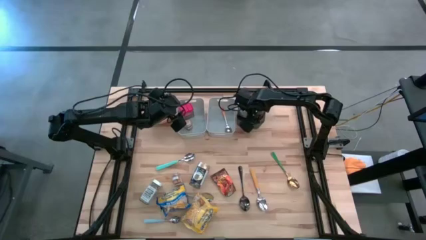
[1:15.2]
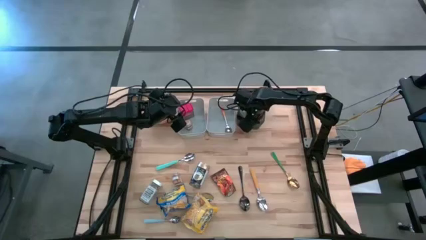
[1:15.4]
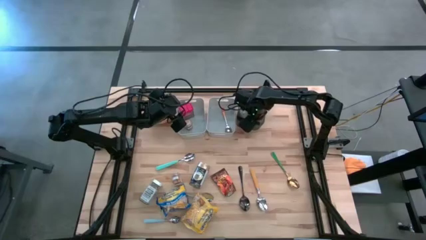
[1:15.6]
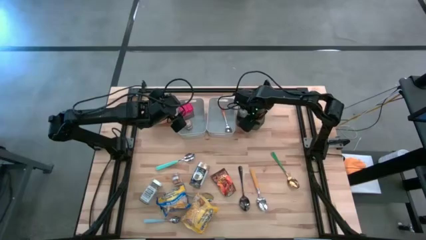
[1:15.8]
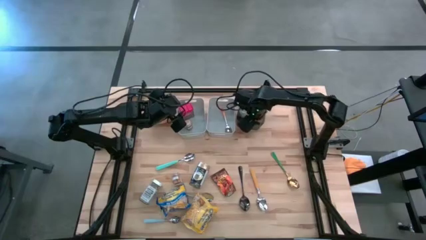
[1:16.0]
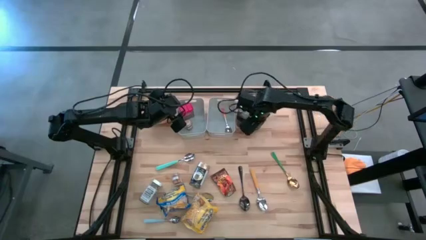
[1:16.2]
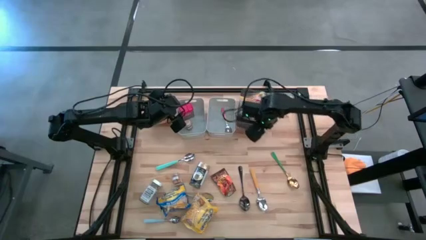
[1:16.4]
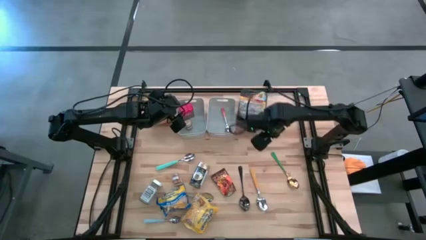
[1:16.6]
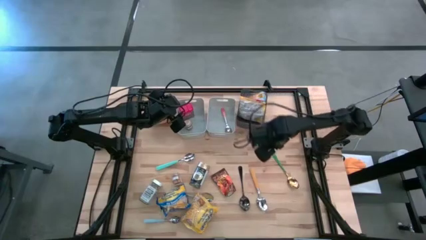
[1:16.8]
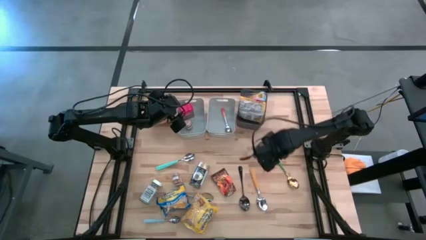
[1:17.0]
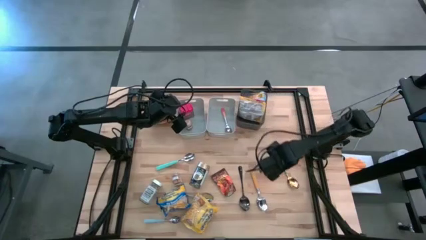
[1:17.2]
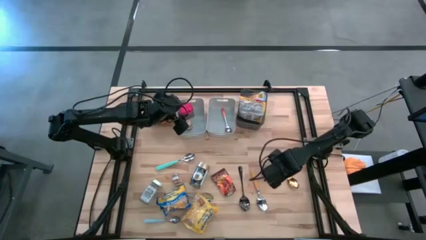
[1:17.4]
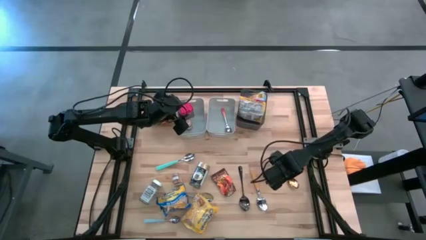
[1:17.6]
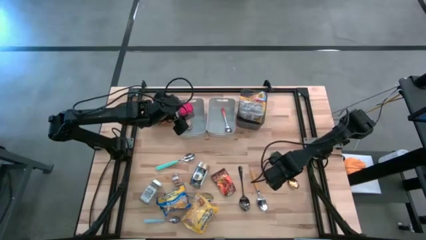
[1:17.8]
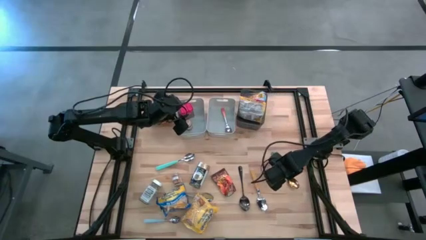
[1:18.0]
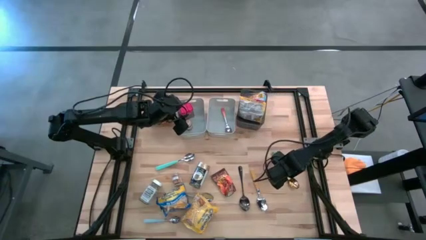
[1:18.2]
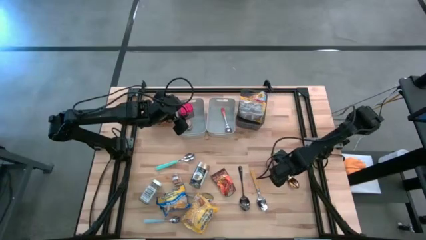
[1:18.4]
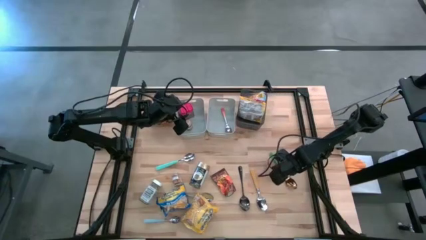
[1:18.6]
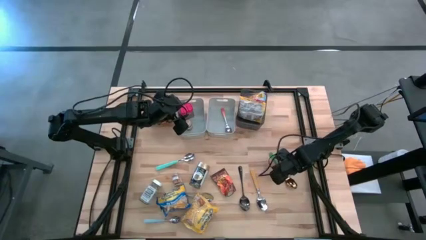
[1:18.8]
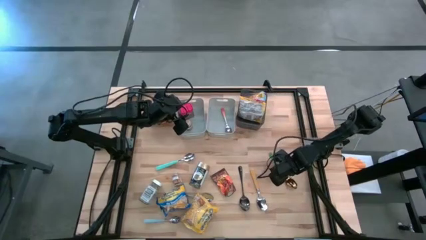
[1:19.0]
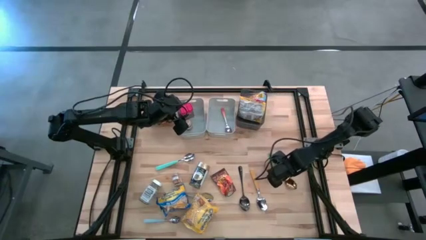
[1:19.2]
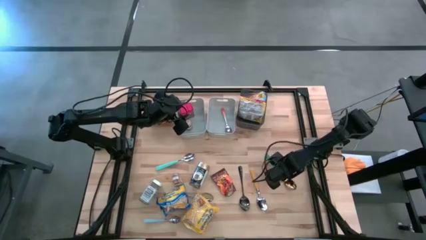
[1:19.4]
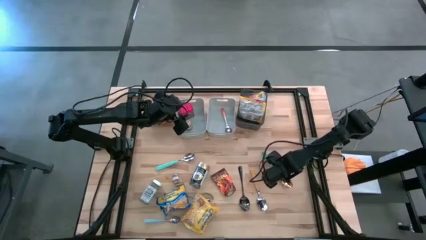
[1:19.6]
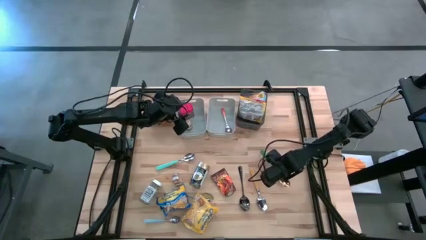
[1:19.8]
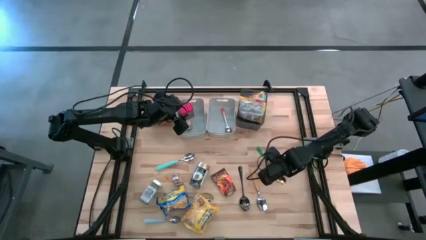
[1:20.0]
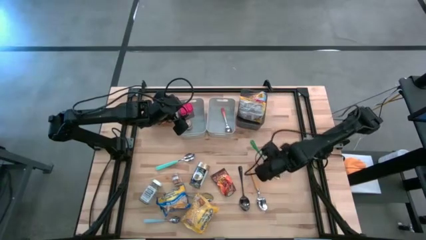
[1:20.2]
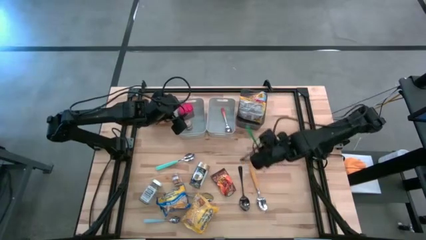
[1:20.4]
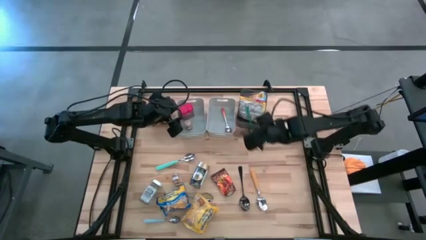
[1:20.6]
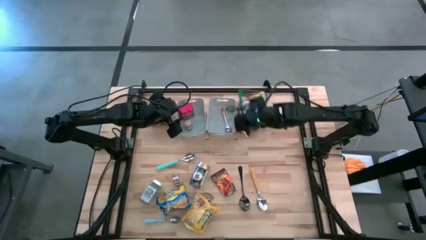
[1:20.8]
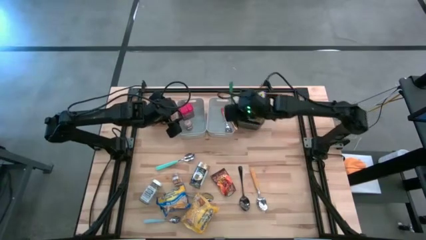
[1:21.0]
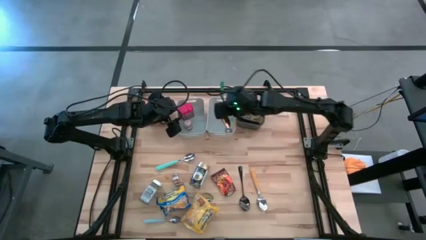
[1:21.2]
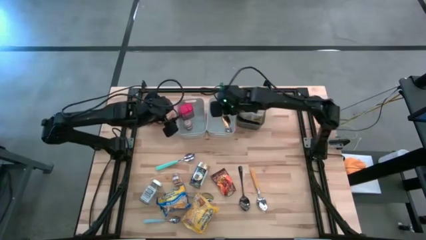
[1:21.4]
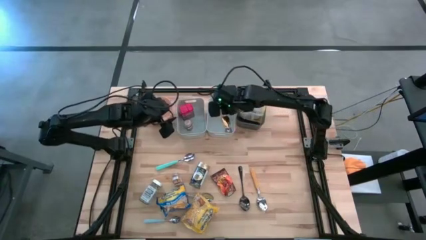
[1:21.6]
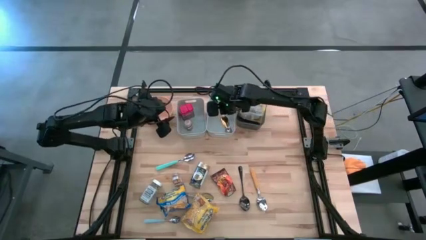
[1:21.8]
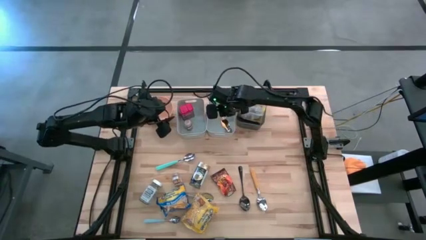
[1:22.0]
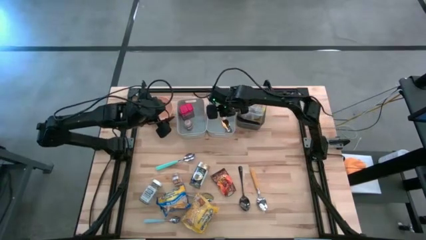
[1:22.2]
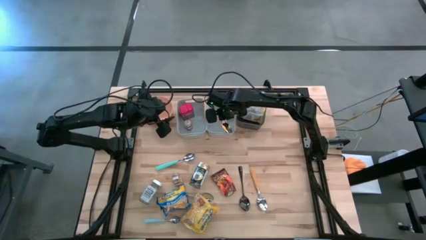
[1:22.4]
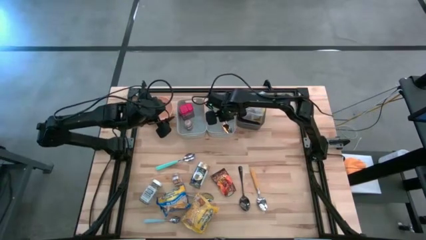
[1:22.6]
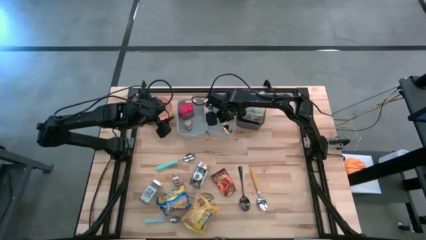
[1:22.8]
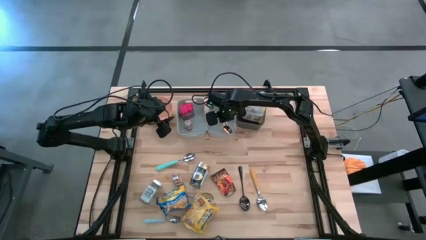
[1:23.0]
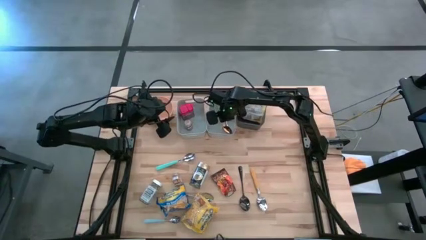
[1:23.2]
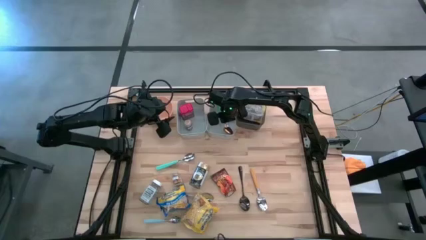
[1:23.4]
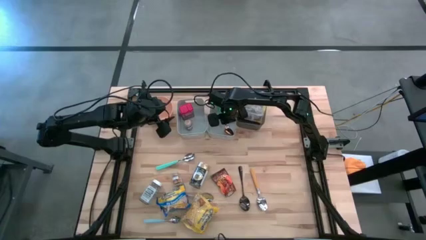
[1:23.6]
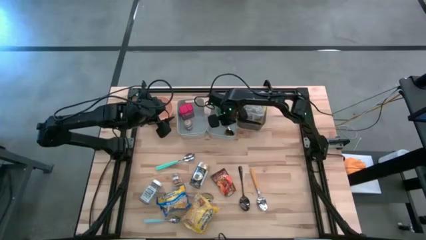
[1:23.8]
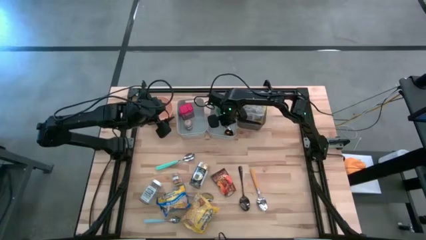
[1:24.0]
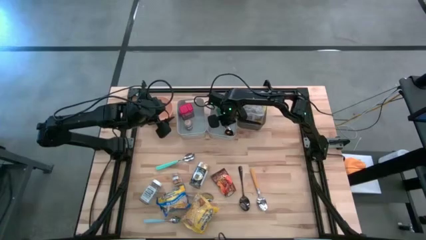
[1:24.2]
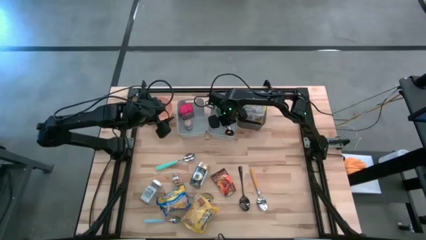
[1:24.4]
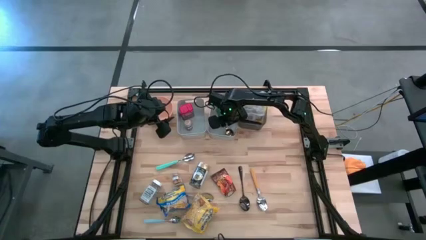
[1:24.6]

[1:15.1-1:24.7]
Put the green spoon into the right gray bin

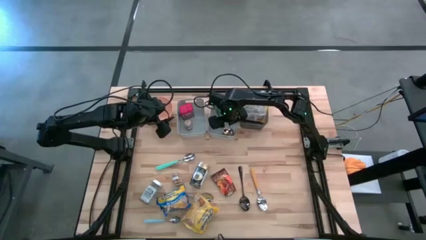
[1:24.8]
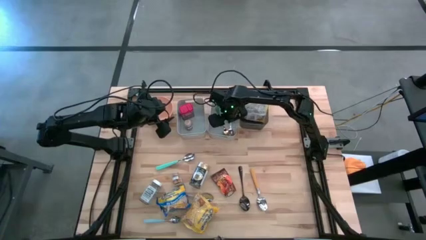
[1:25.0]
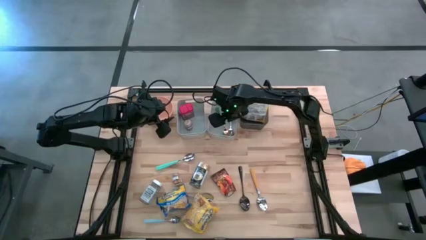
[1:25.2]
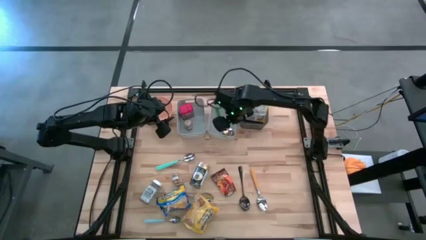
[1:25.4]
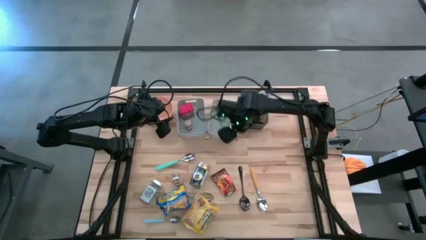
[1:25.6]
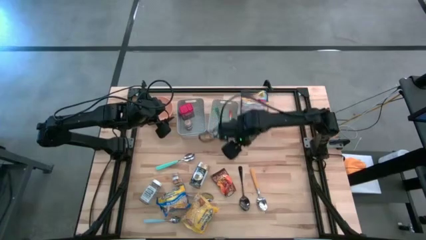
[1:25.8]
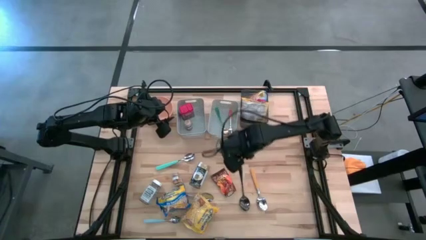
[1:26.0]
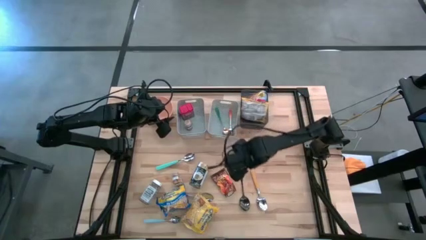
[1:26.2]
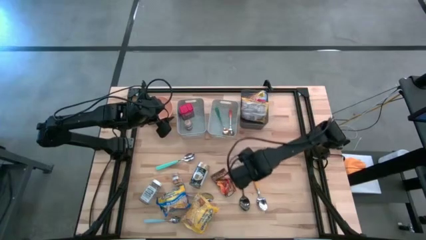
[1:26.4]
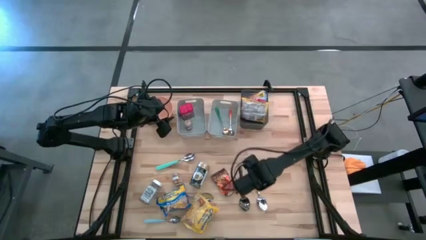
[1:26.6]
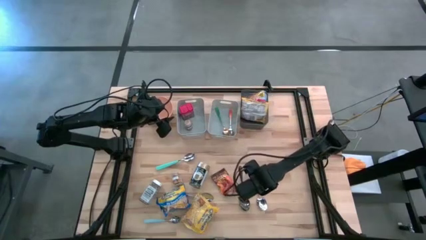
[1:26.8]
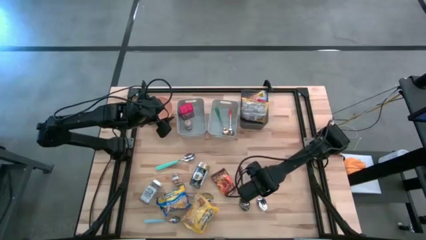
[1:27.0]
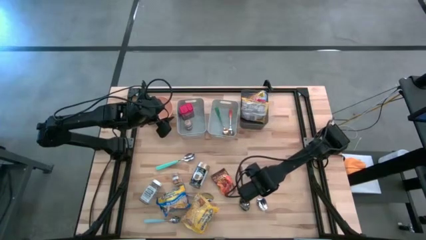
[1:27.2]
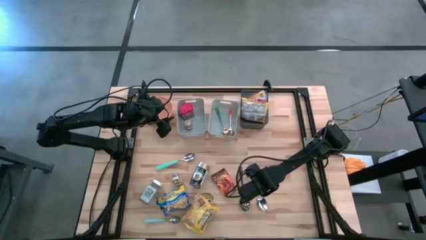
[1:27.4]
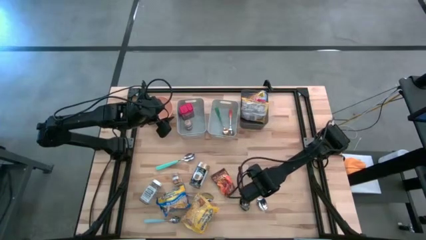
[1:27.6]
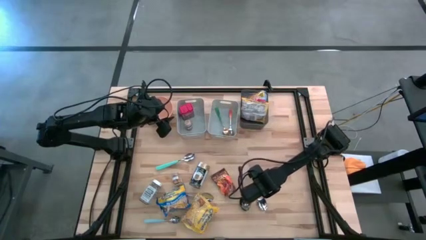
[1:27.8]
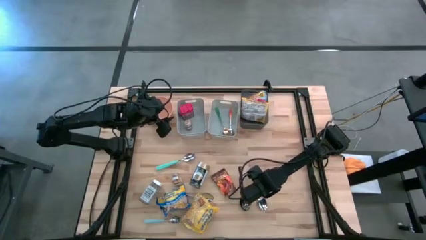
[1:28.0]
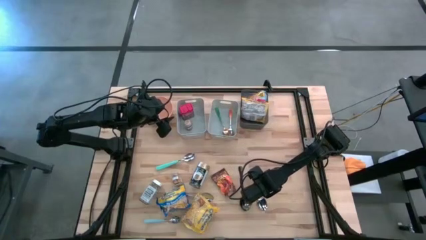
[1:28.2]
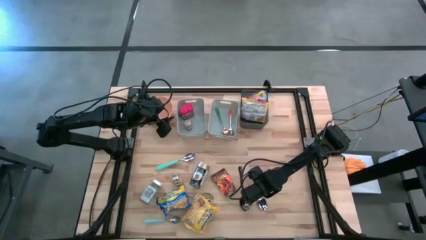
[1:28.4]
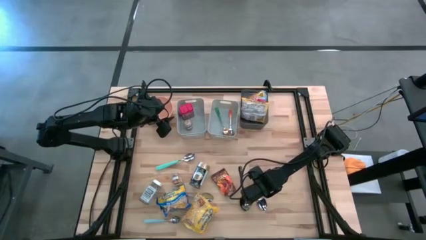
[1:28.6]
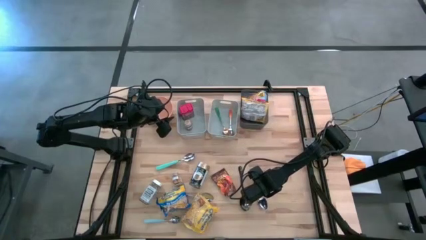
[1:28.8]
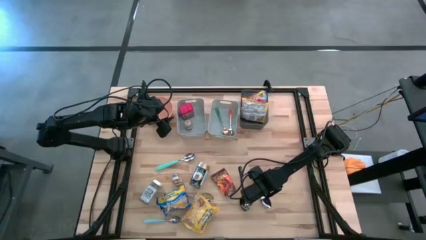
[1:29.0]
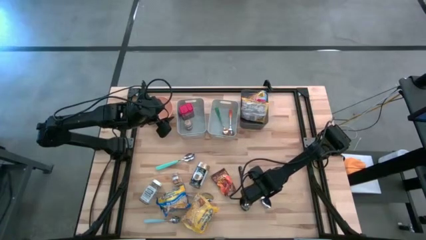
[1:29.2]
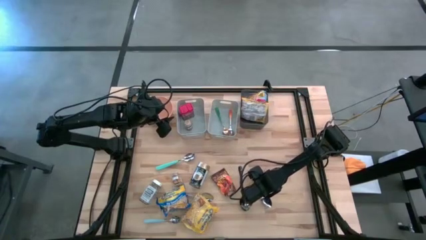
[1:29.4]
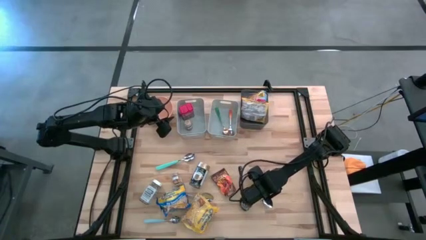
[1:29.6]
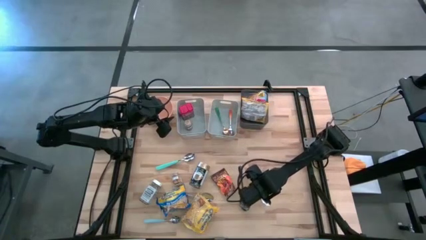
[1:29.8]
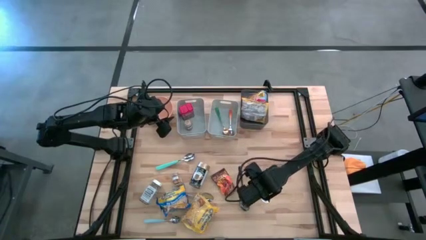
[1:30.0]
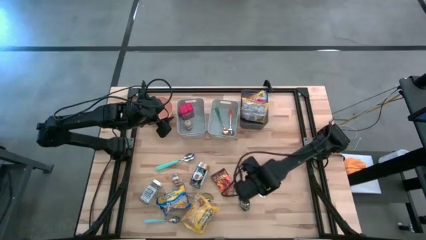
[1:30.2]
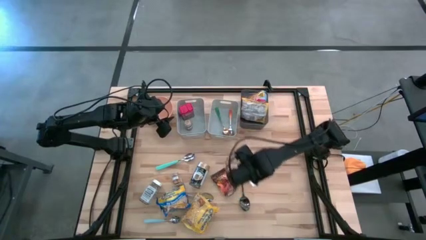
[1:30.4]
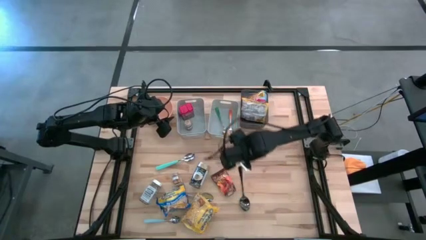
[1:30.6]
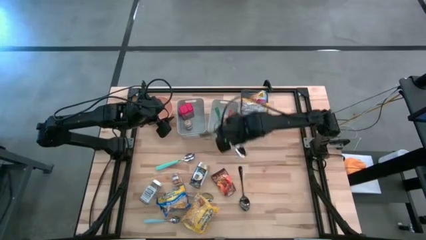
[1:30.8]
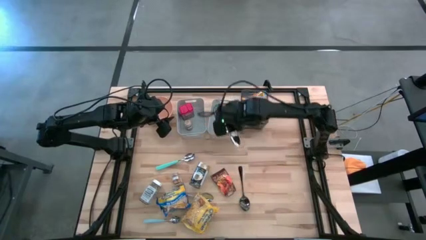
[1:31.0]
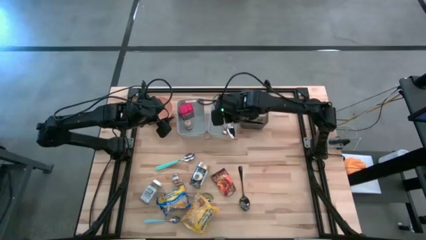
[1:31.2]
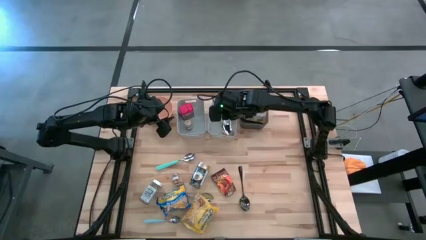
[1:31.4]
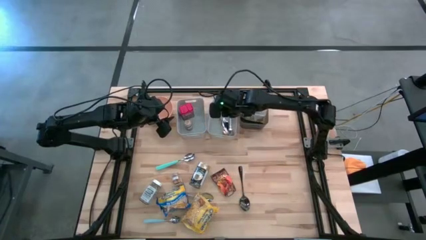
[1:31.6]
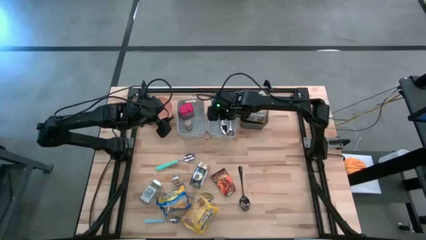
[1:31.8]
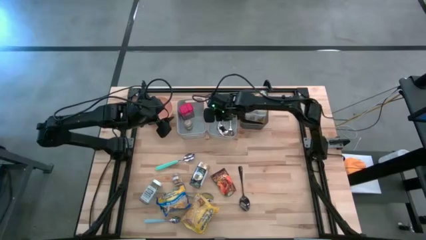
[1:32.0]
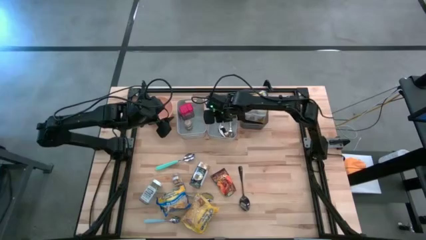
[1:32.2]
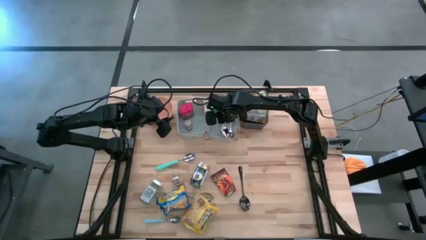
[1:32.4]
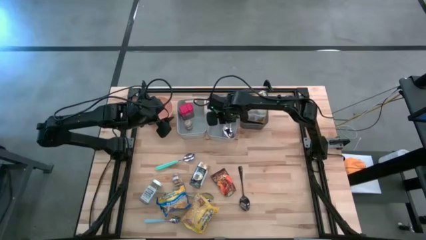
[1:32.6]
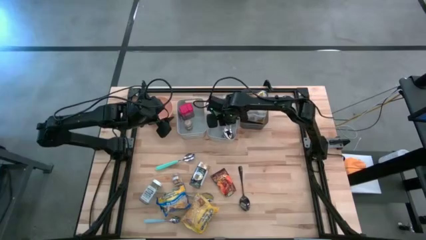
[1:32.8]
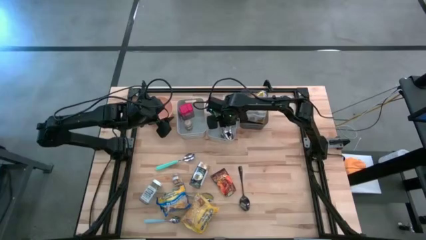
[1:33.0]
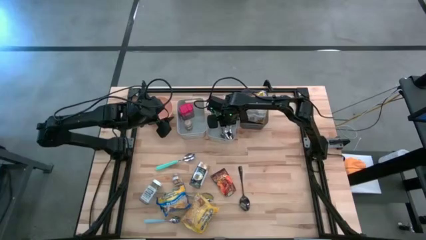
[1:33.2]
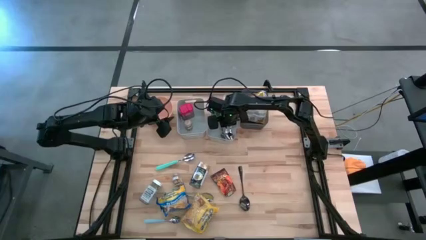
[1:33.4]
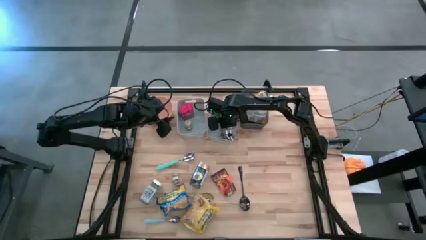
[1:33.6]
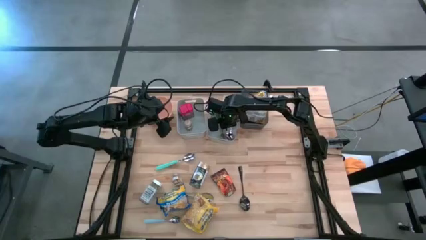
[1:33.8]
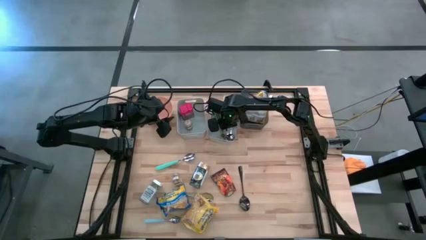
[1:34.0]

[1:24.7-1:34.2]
Put the yellow spoon into the right gray bin
